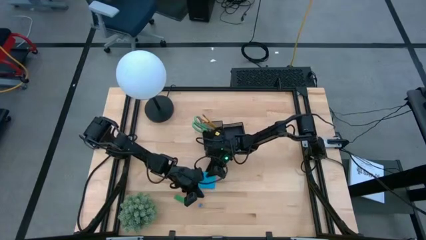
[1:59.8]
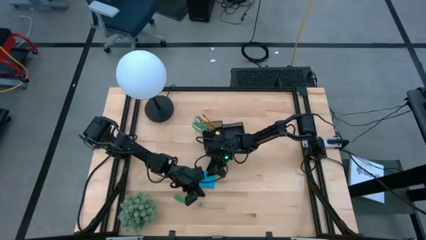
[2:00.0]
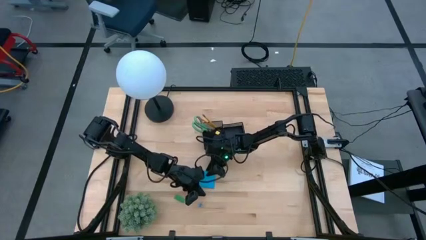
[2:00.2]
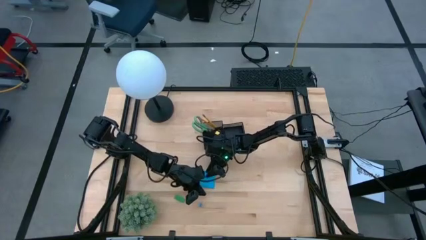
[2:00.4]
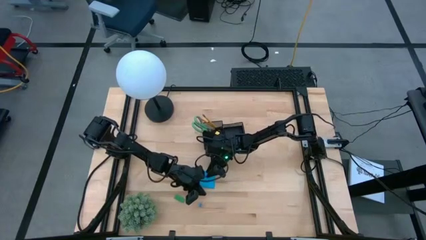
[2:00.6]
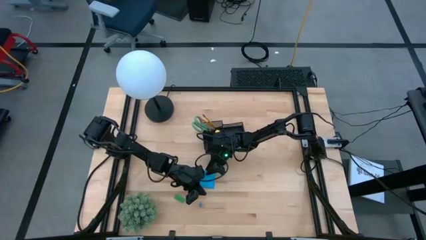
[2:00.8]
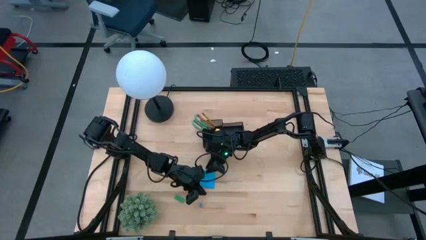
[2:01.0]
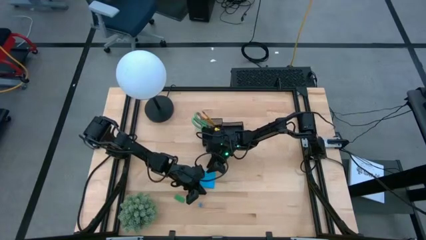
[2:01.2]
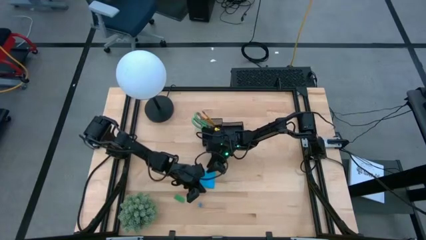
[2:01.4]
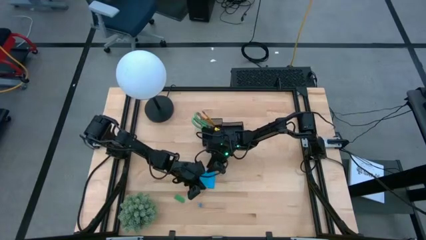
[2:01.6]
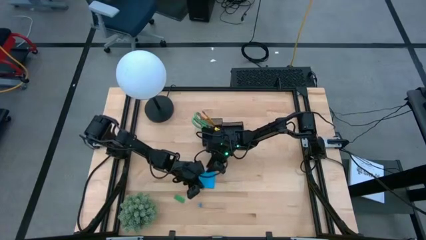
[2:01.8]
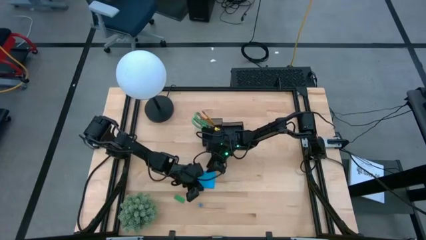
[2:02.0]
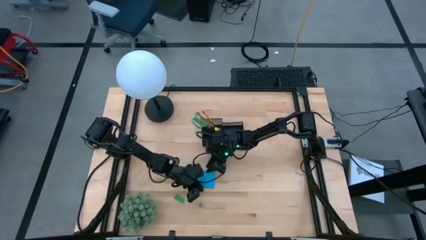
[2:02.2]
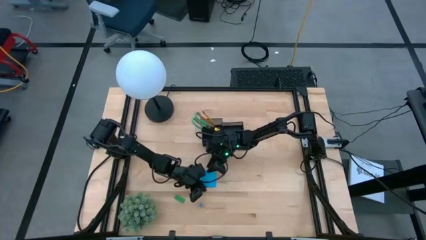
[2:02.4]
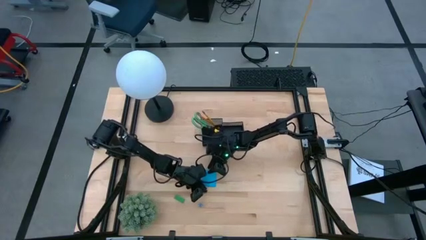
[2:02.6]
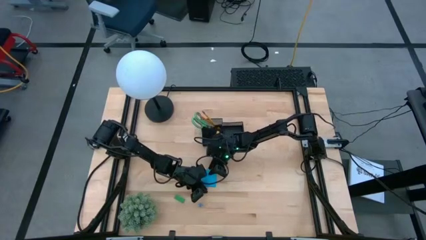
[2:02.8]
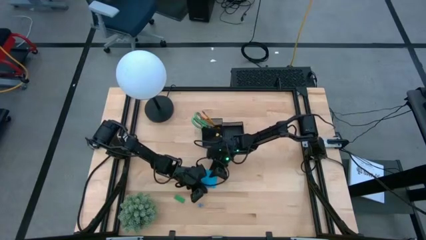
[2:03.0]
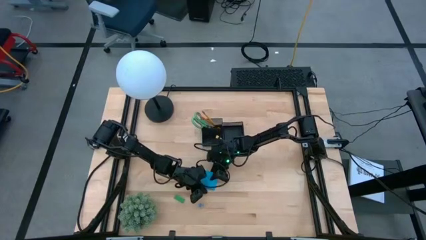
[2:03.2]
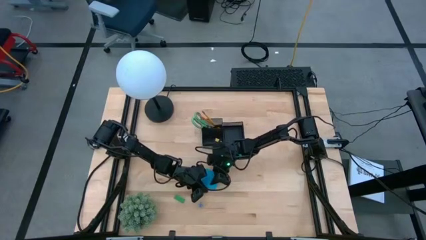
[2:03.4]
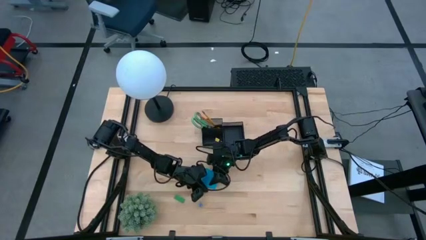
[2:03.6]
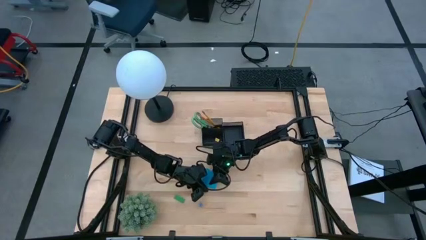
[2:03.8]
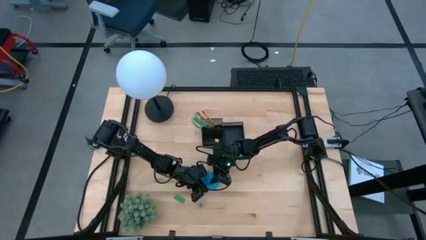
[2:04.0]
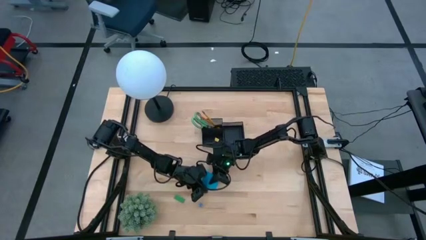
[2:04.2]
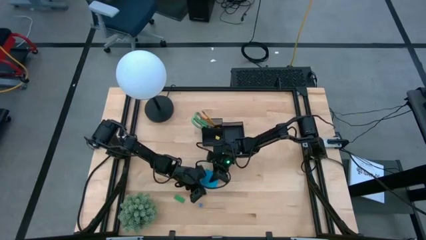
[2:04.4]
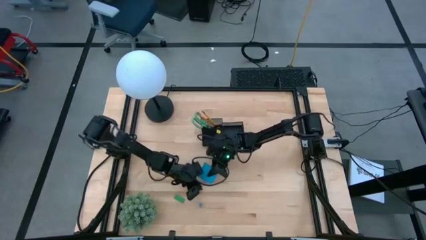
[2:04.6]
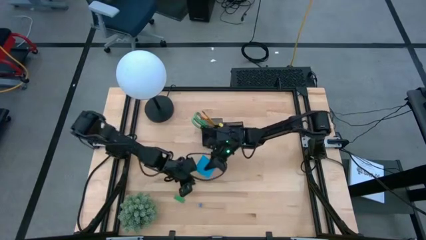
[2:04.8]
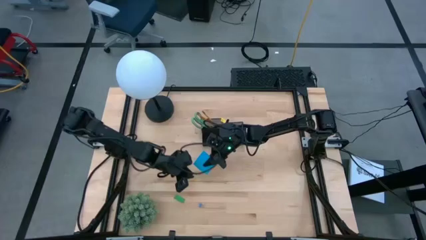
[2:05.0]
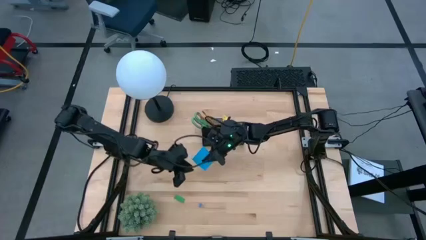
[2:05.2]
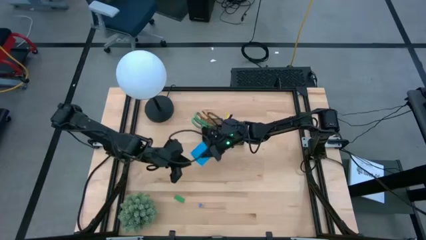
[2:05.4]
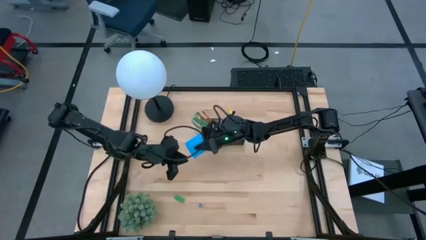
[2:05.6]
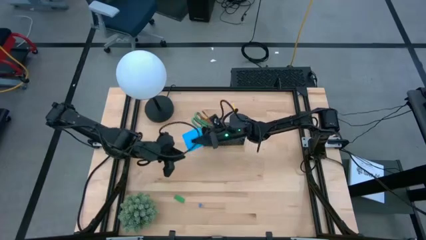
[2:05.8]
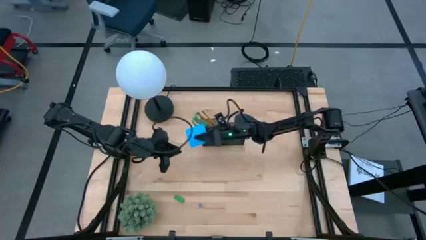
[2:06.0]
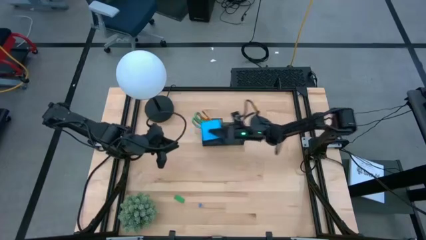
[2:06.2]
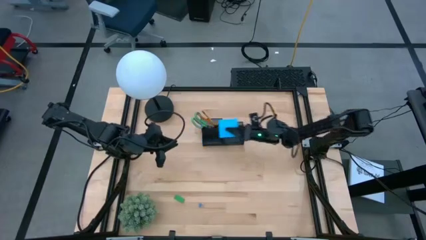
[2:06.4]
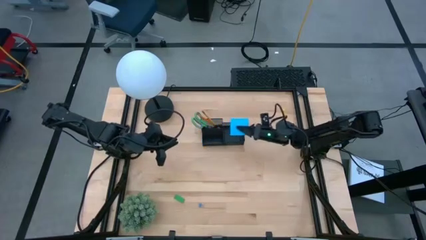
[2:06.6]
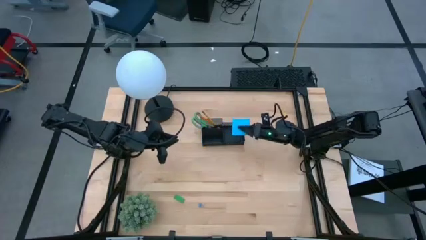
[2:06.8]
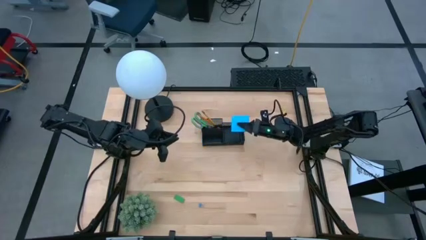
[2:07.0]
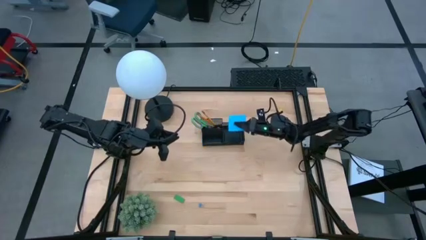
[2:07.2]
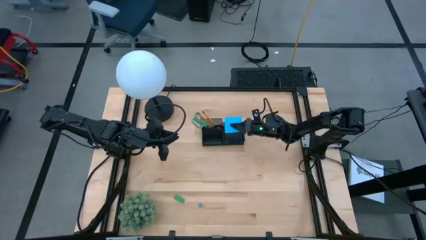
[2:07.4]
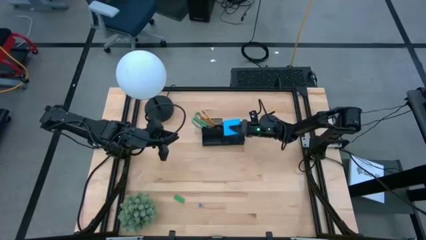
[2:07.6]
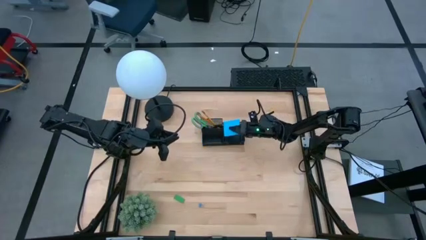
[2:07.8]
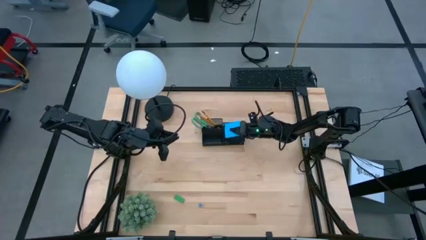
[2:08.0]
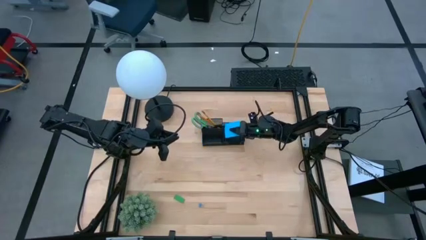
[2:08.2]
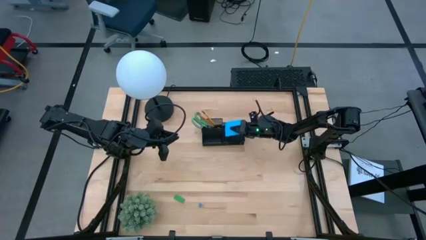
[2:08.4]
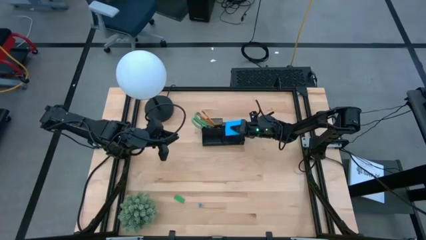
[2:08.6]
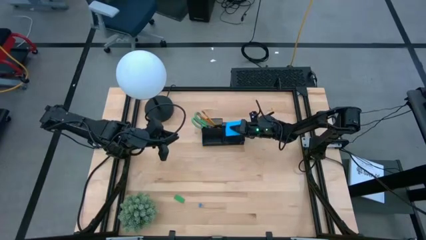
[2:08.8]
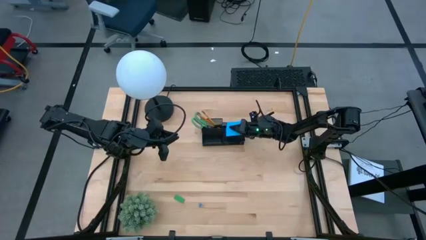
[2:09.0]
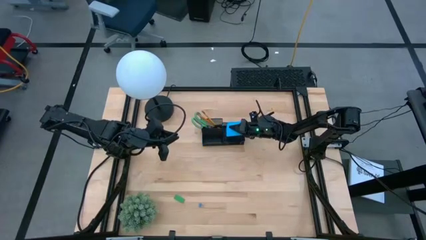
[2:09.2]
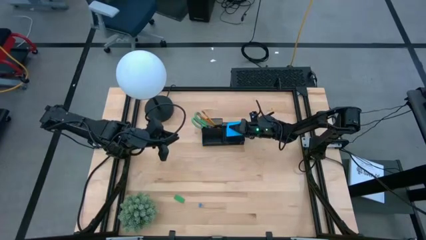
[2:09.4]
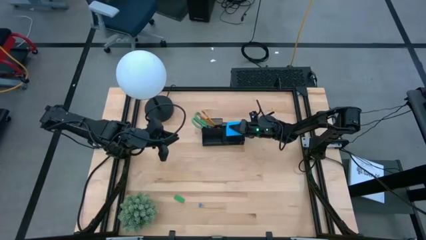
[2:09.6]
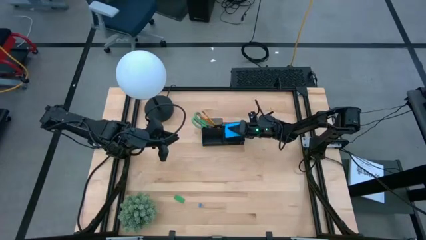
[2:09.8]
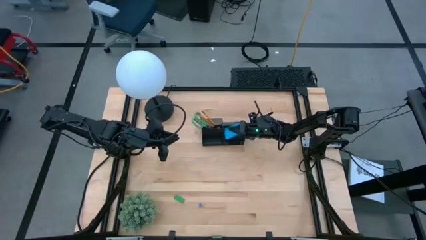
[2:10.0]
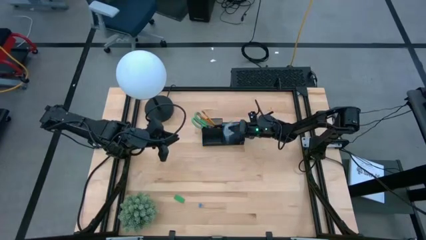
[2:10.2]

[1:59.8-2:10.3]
Task: Pick and place office supplies into organizer
Put the blue sticky notes into the black desk organizer

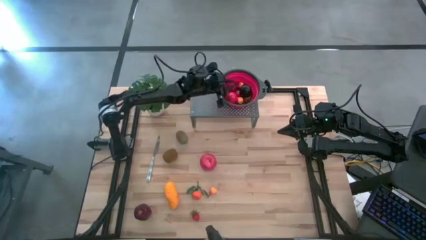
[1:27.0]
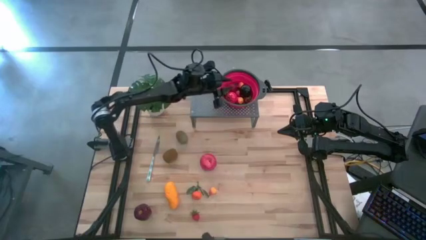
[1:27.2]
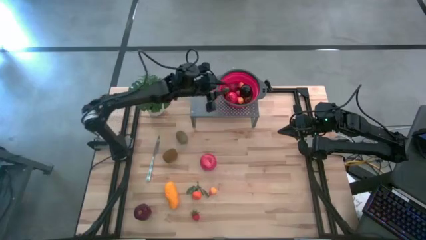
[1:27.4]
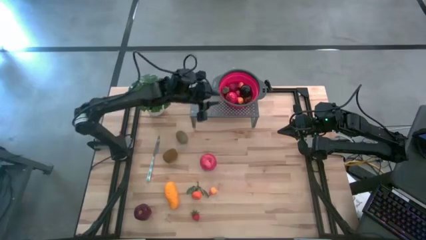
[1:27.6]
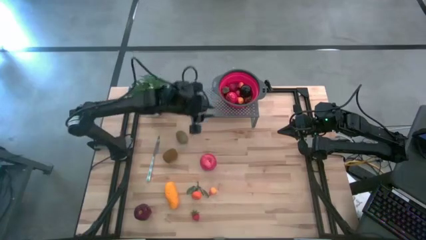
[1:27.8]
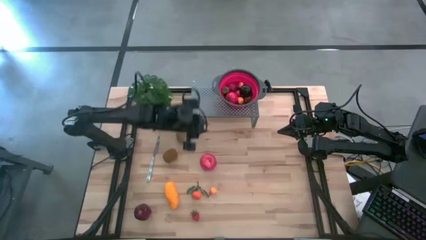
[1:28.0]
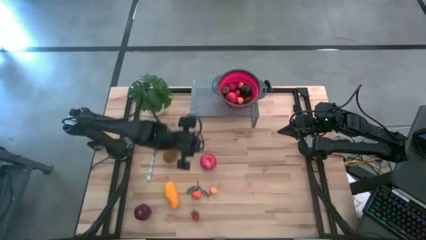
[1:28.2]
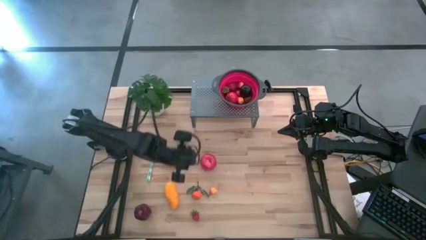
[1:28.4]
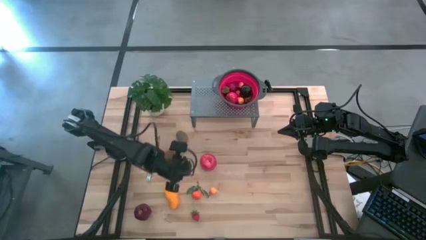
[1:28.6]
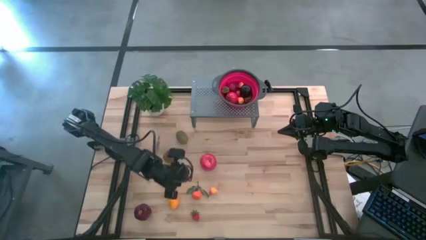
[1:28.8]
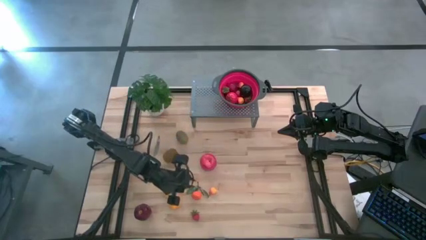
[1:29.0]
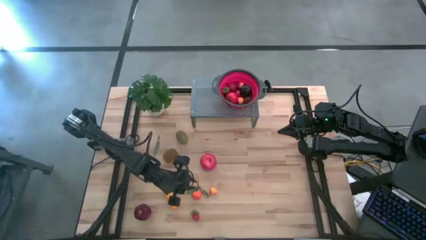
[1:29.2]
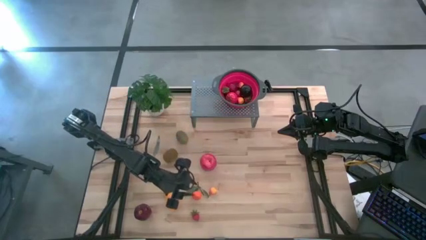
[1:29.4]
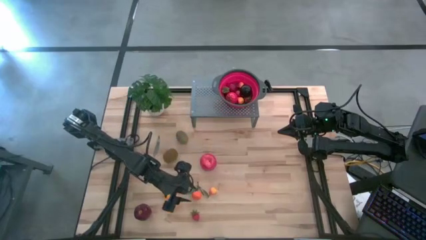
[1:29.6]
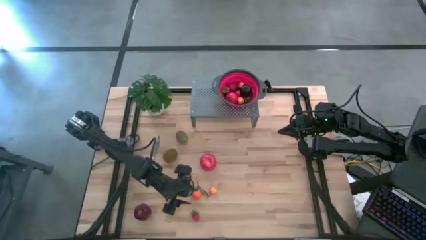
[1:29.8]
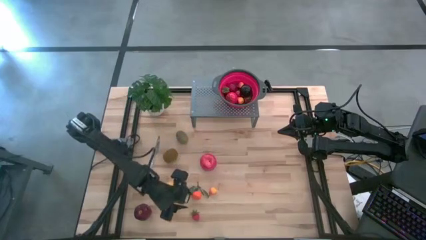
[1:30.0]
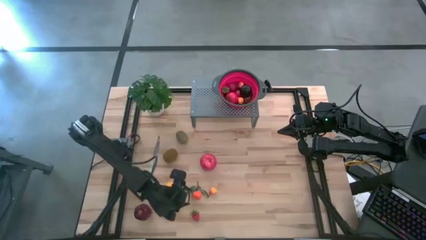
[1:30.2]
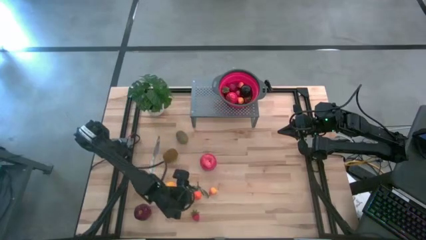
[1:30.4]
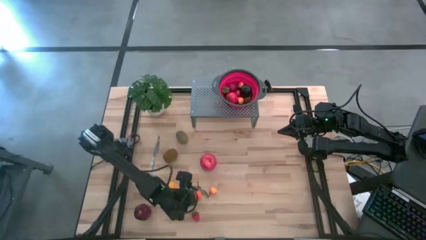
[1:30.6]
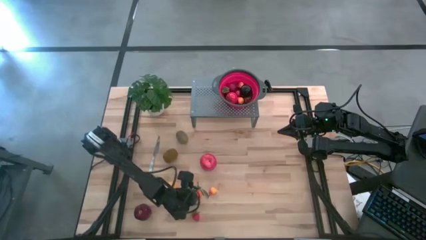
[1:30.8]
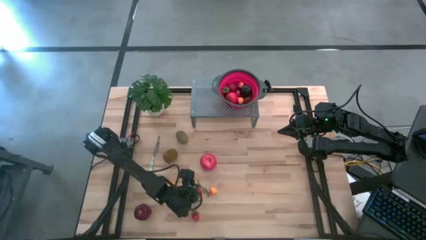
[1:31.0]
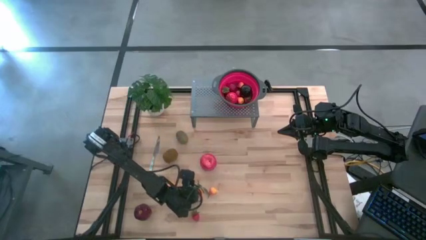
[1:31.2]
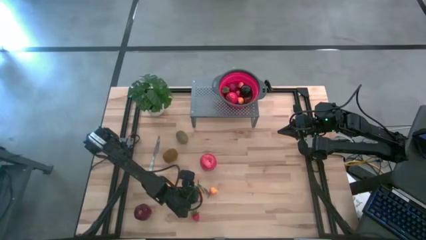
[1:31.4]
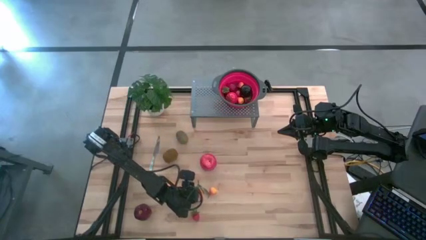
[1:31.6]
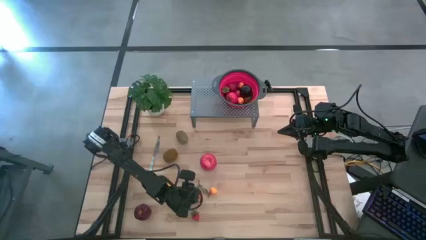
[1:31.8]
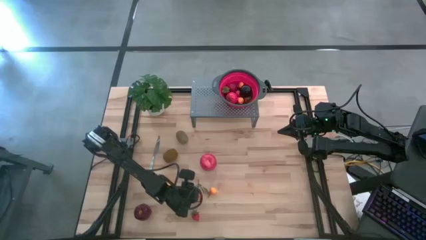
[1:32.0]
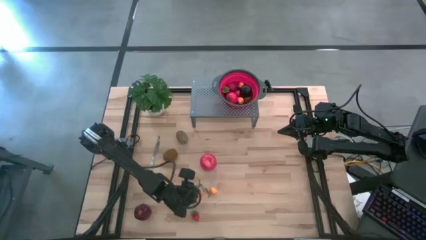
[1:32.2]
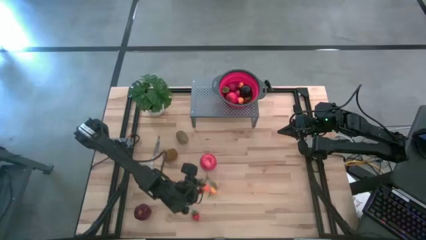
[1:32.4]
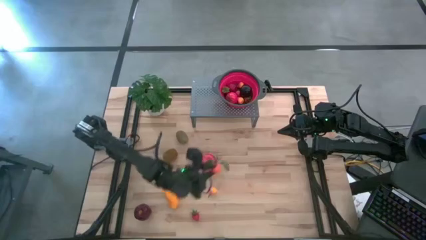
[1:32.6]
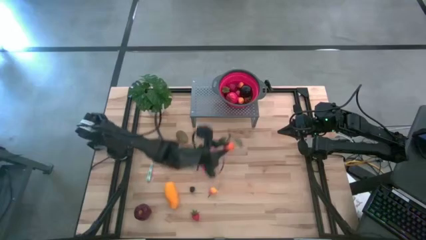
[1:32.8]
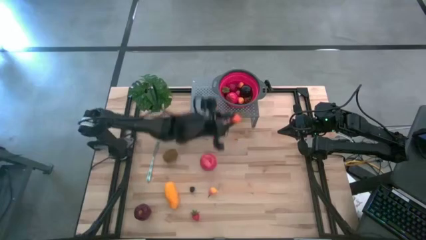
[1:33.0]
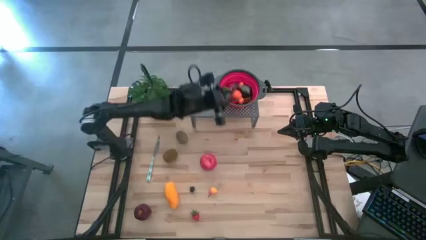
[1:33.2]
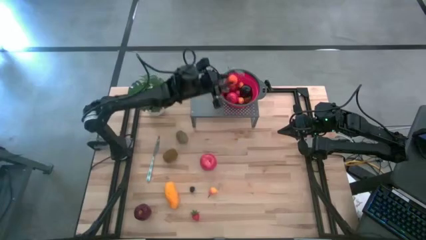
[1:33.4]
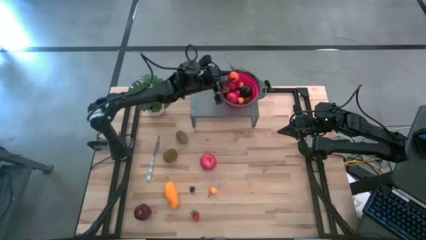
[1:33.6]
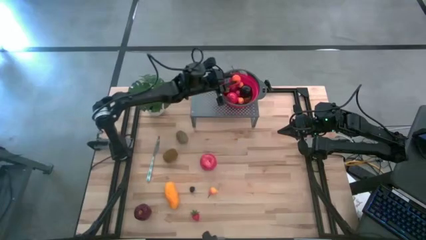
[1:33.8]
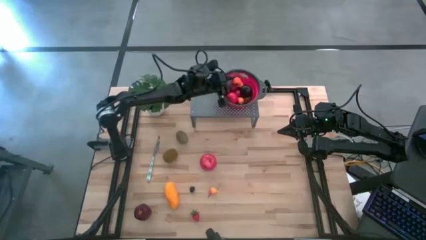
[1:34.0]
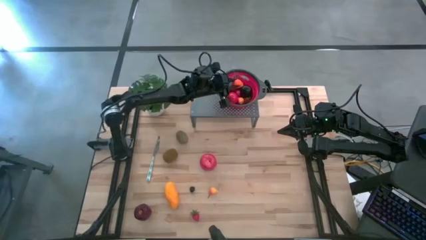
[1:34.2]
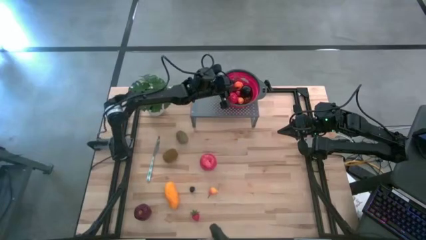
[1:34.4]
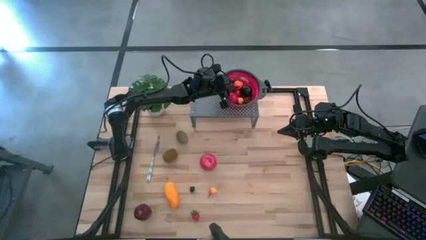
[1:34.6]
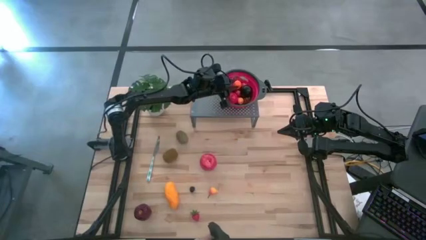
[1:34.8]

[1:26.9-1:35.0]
Task: Pick & Place Fruit
Put the orange into the strainer bowl on the shelf
